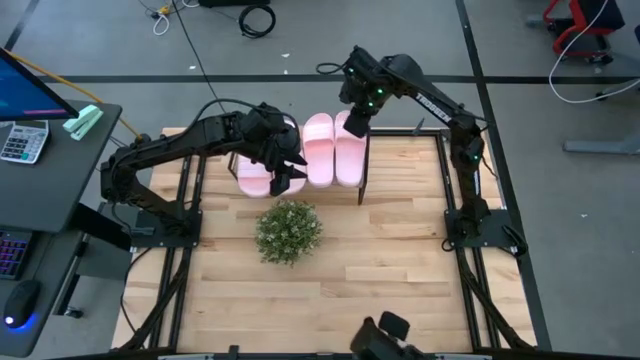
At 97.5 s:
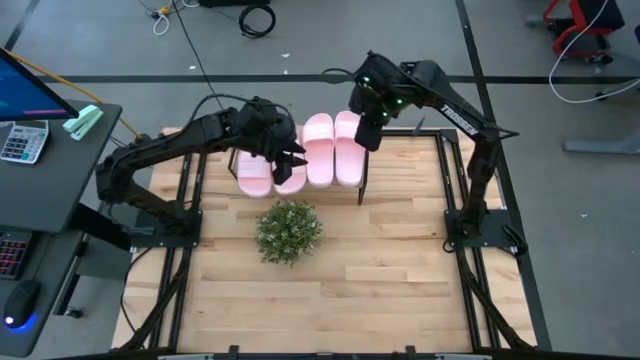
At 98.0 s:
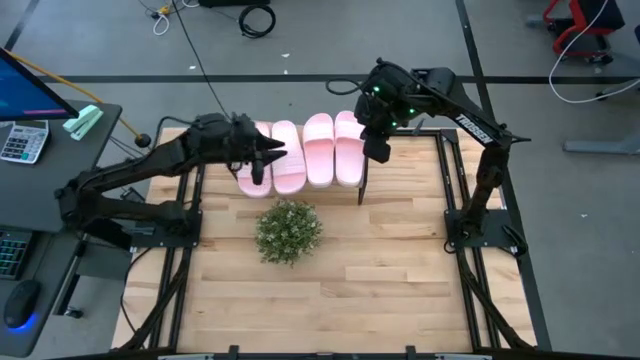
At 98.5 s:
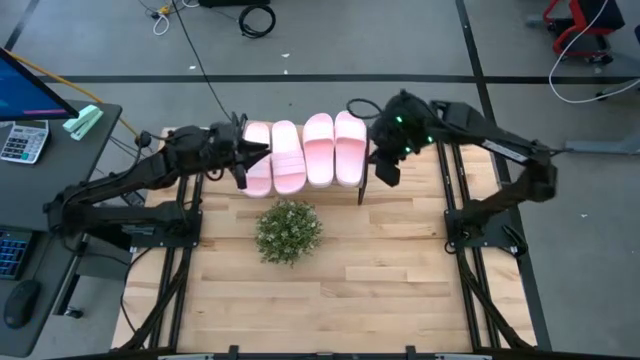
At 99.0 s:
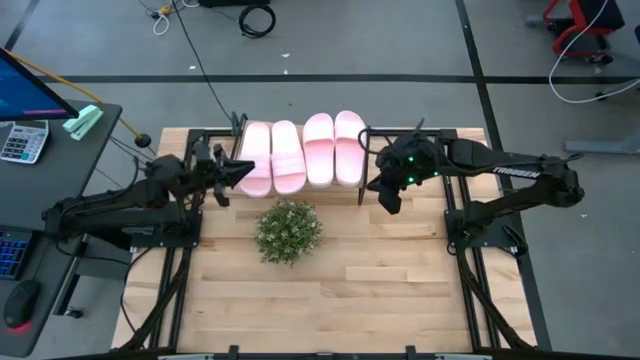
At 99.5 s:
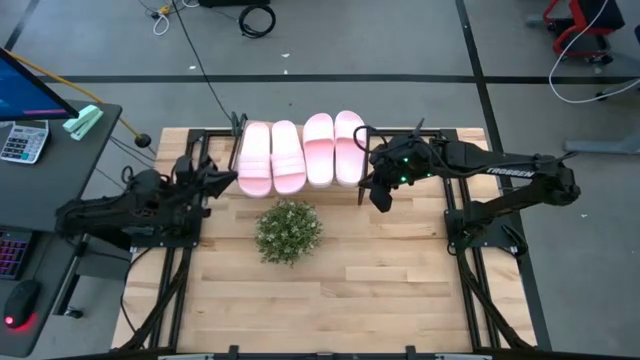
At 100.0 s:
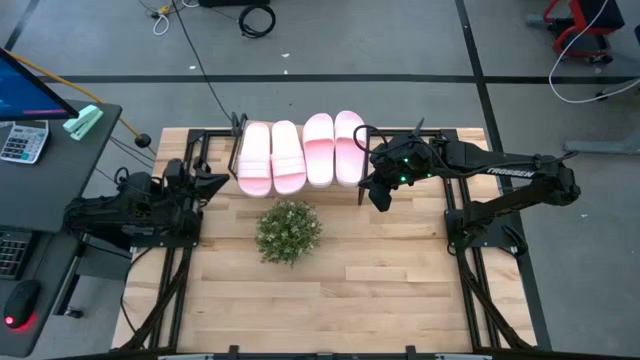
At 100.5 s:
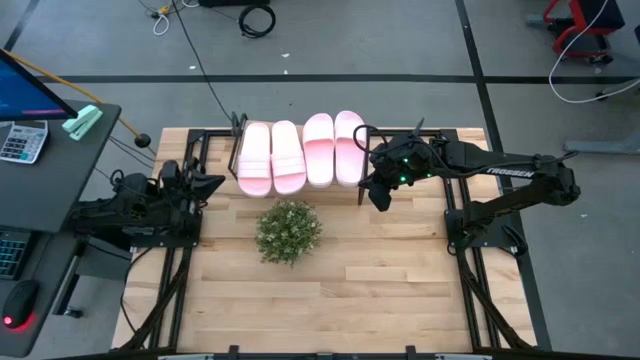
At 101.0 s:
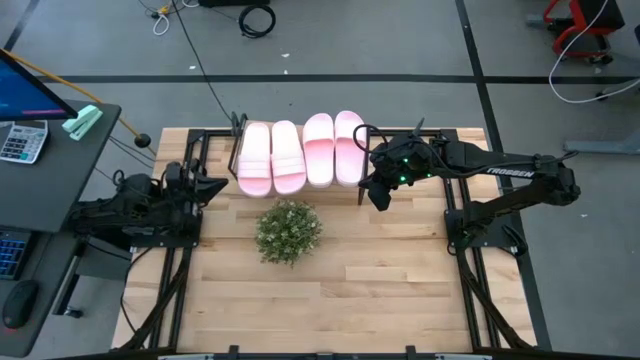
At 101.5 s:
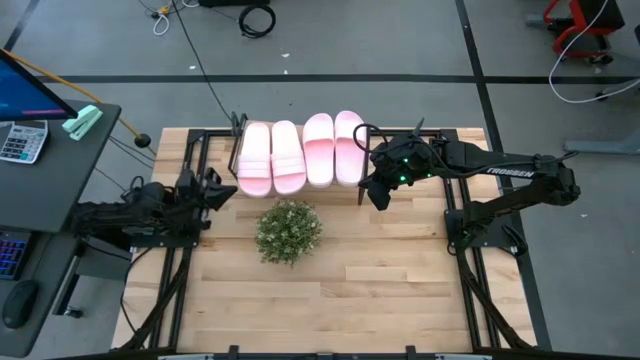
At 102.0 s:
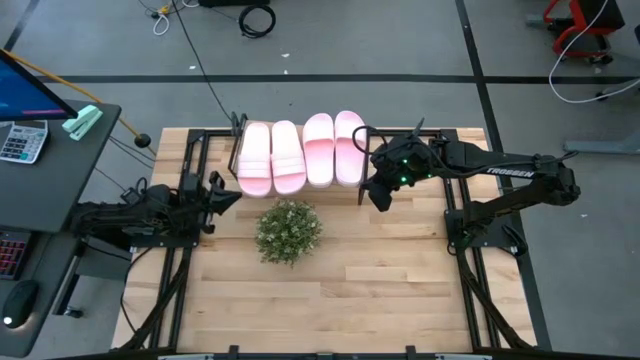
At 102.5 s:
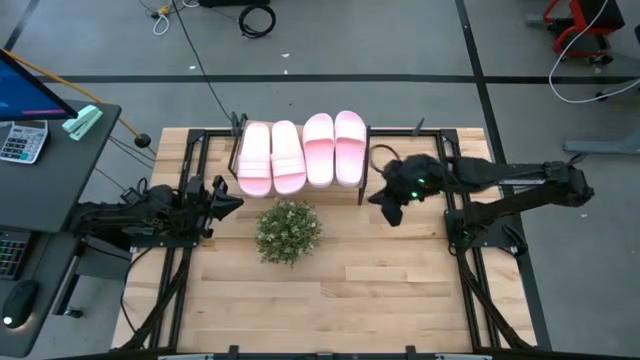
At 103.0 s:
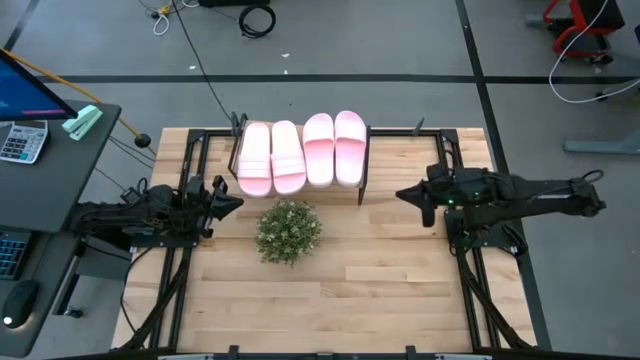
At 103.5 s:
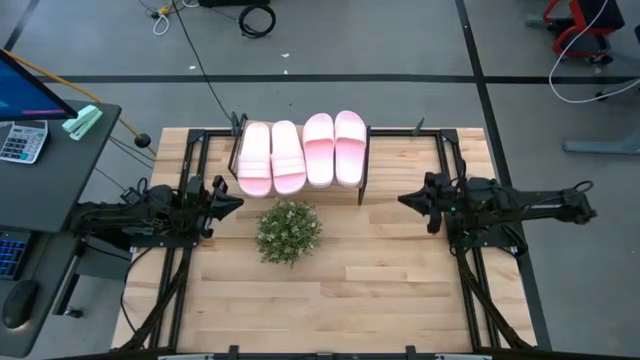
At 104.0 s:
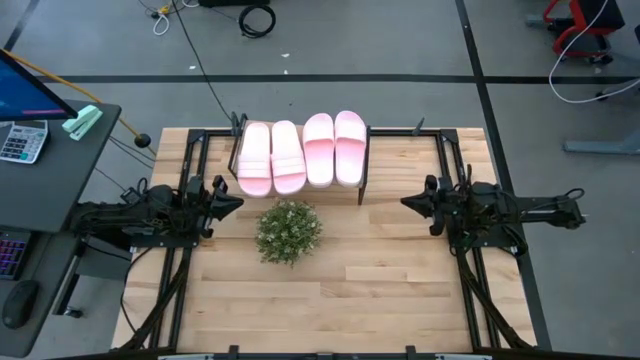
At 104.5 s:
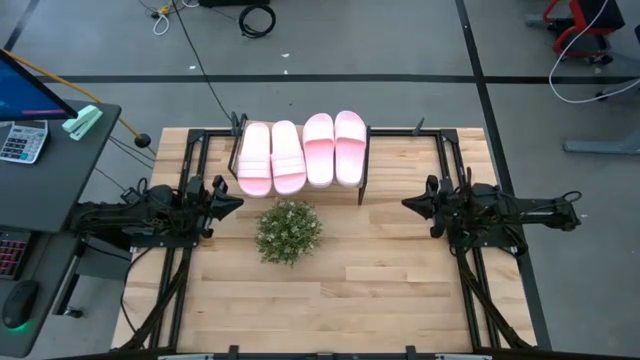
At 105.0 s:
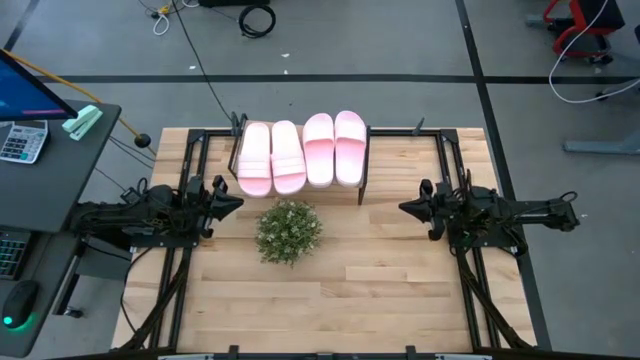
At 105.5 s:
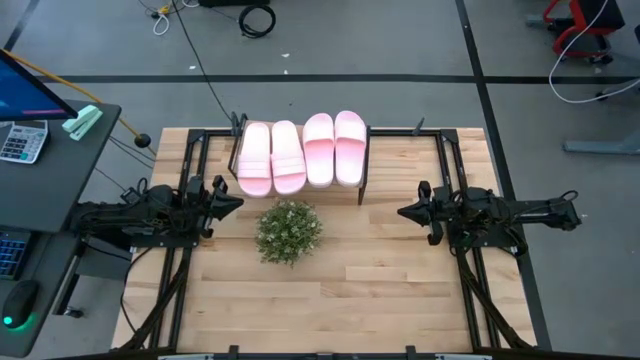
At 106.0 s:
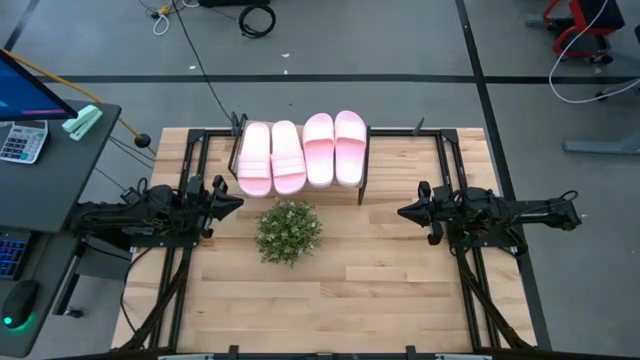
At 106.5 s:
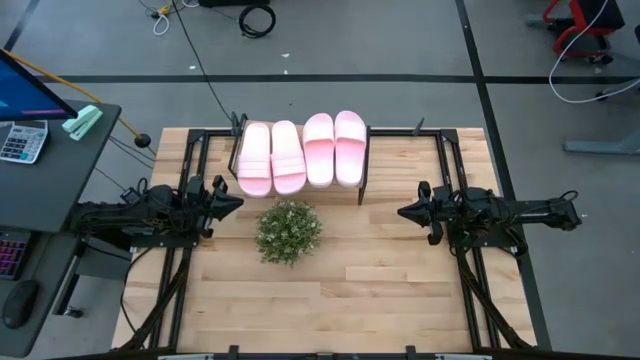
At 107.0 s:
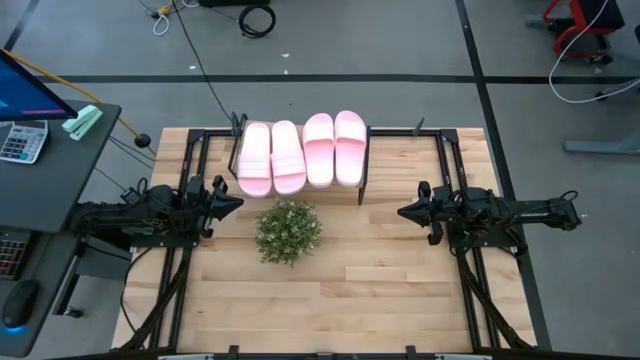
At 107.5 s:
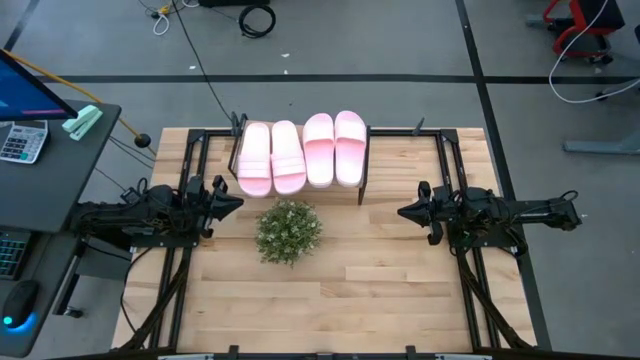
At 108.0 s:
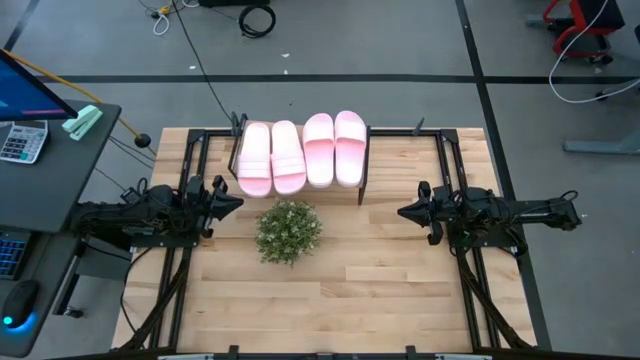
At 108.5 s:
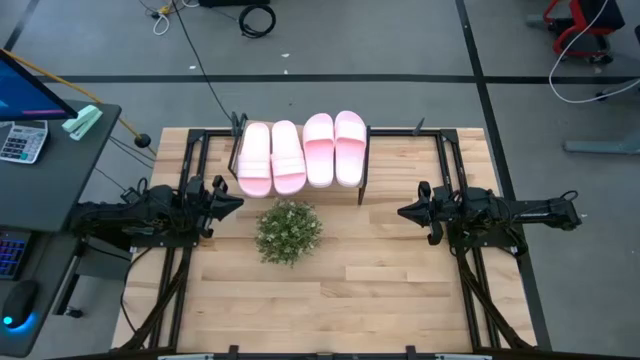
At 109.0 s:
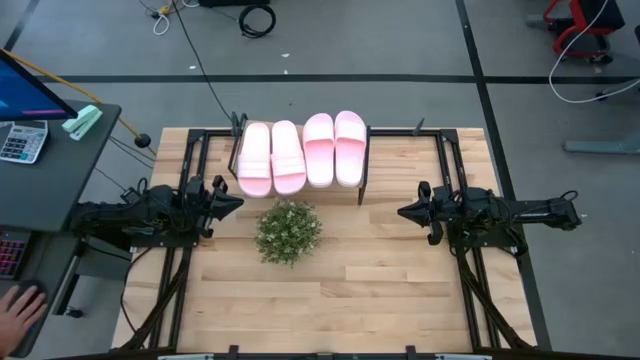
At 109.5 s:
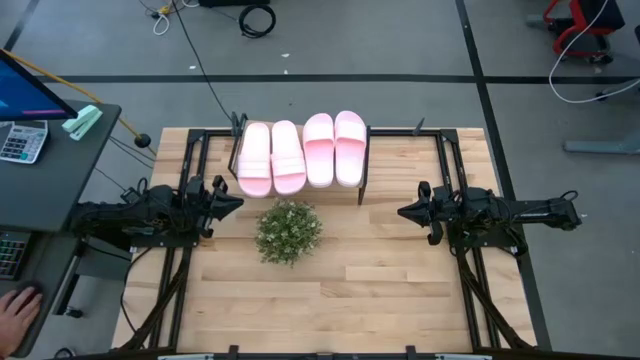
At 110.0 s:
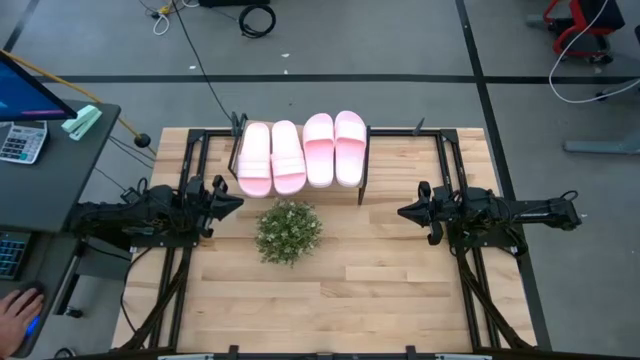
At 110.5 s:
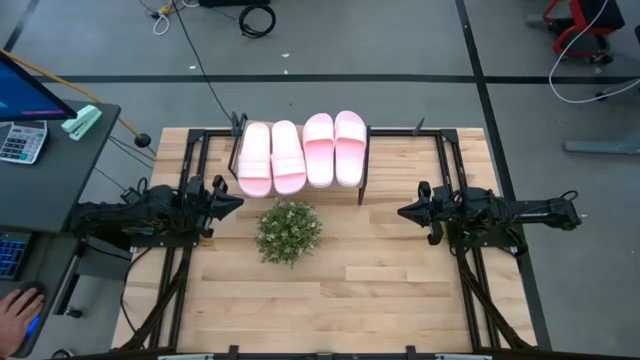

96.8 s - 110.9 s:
Task: Pick and place slides into the shelf
Return to Home Position

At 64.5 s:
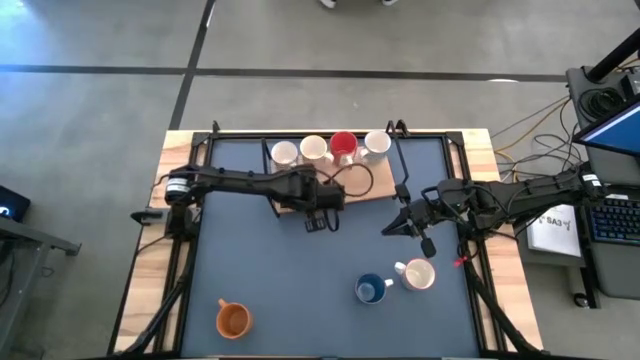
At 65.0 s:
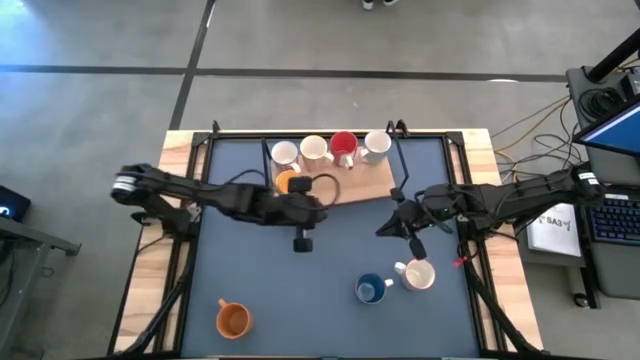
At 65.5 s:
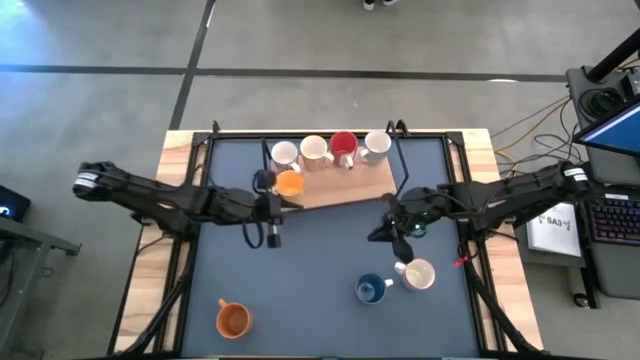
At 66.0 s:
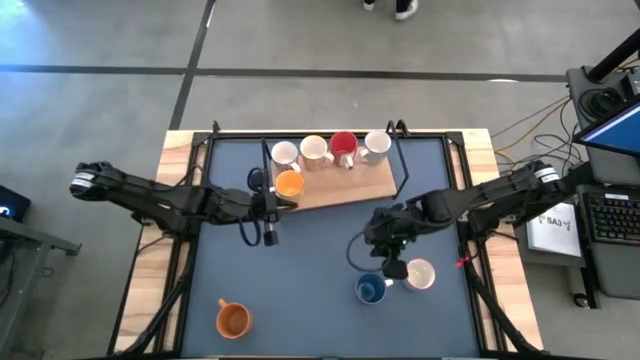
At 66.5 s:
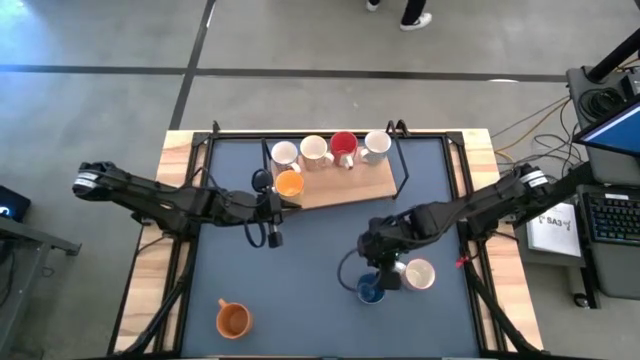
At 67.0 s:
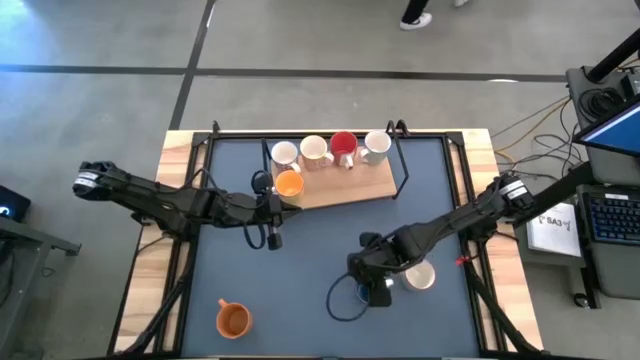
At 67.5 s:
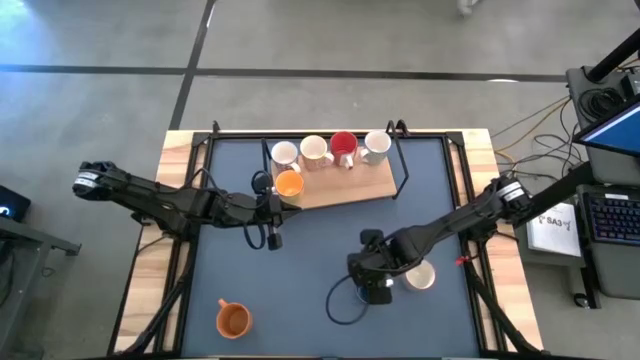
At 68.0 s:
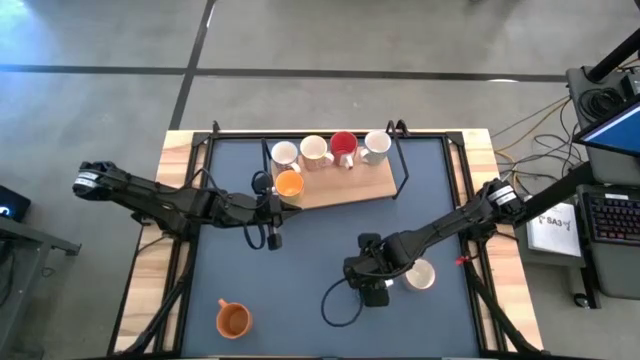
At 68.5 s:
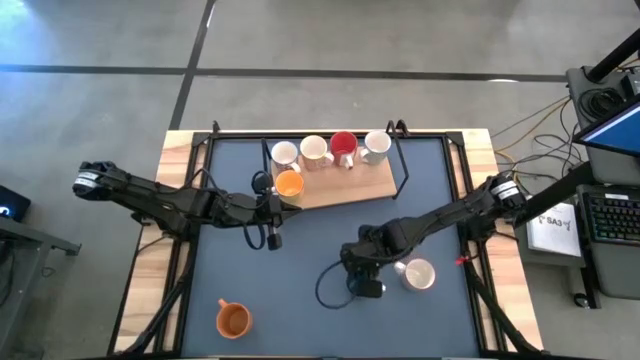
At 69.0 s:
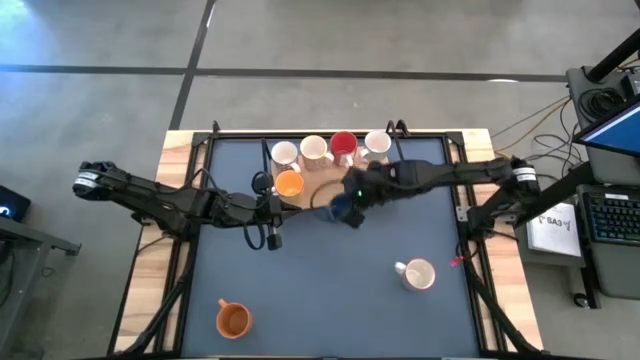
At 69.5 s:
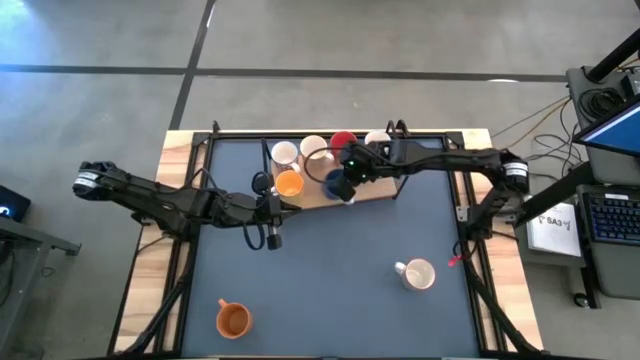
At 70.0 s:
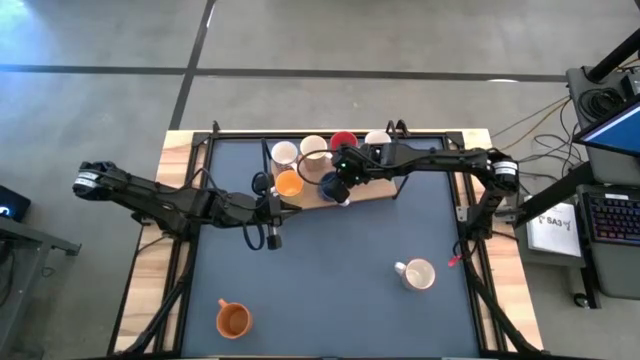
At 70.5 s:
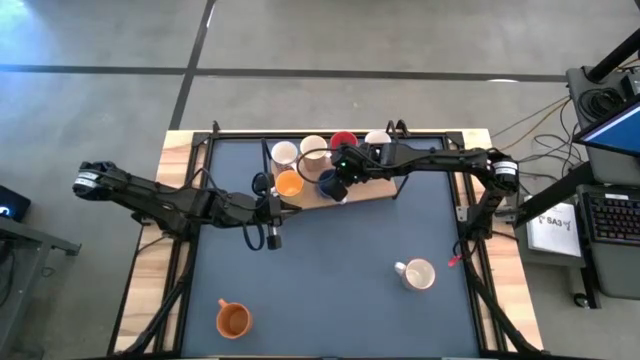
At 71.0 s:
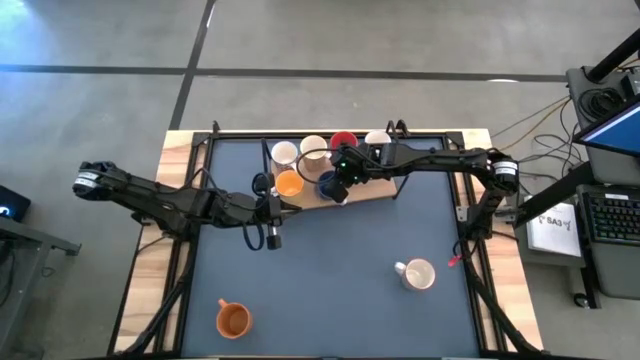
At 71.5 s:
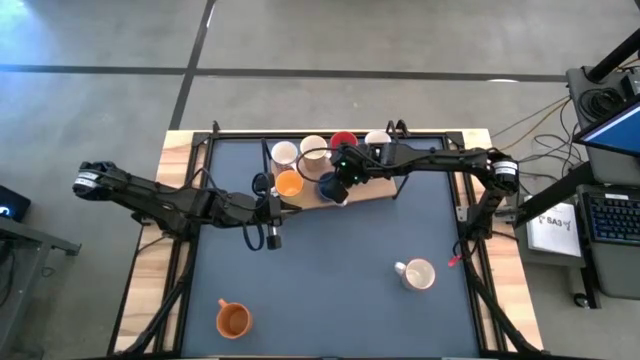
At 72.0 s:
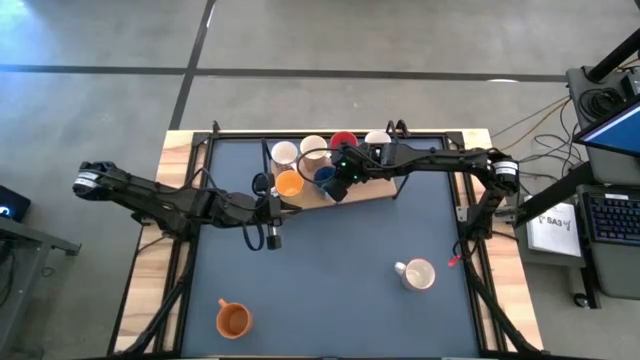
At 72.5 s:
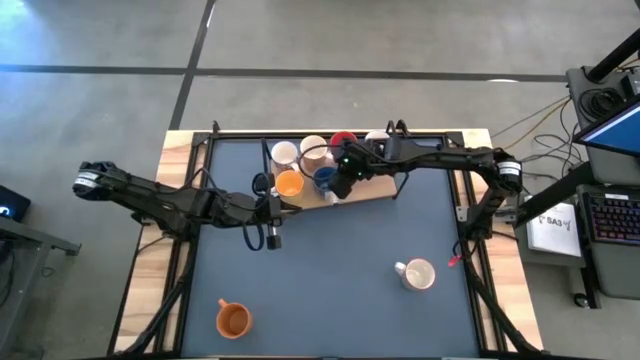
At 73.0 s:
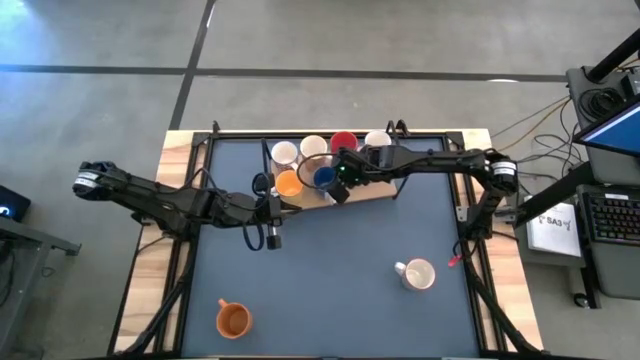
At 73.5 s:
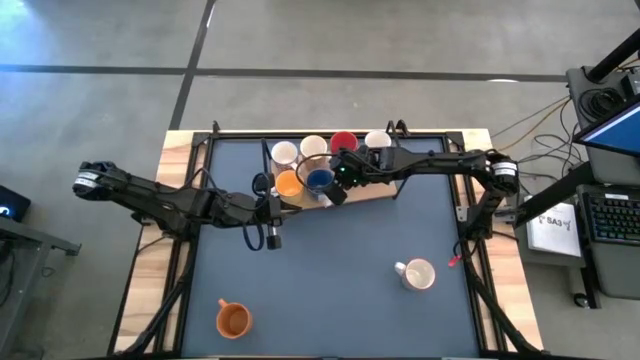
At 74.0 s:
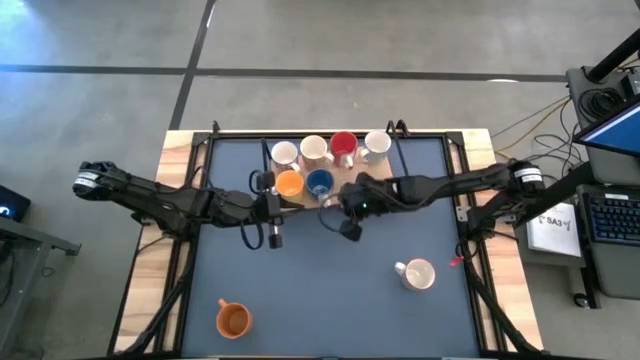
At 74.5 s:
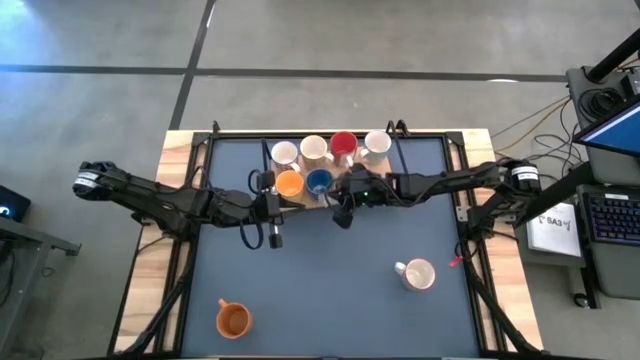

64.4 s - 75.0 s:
Task: Place coffee mugs
Put the blue mug on the shelf
